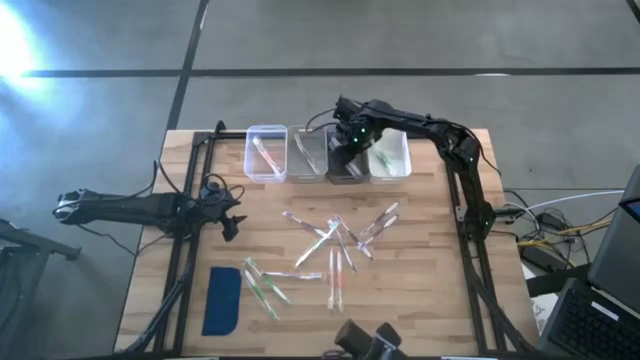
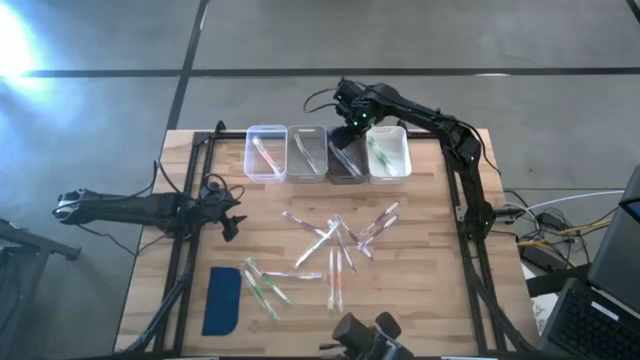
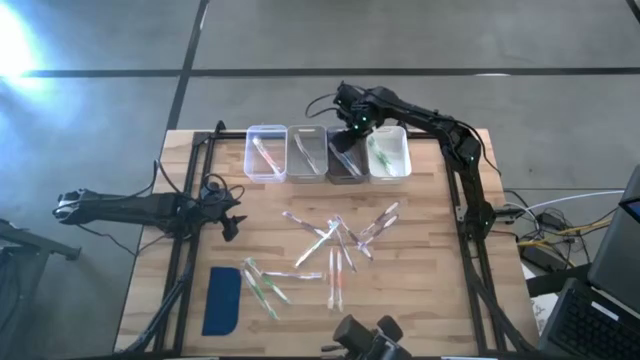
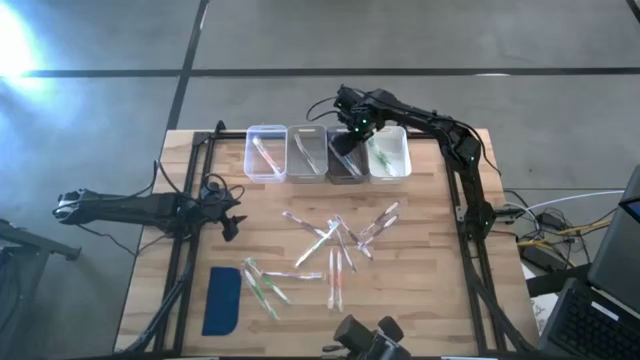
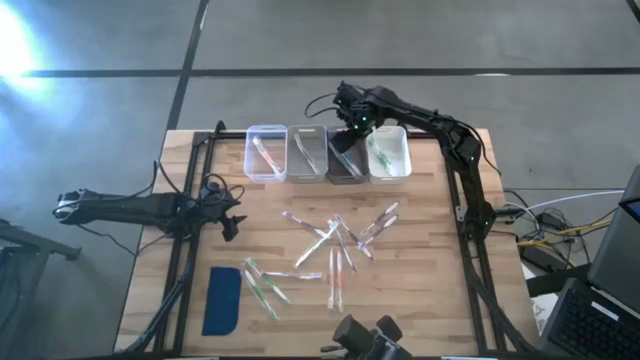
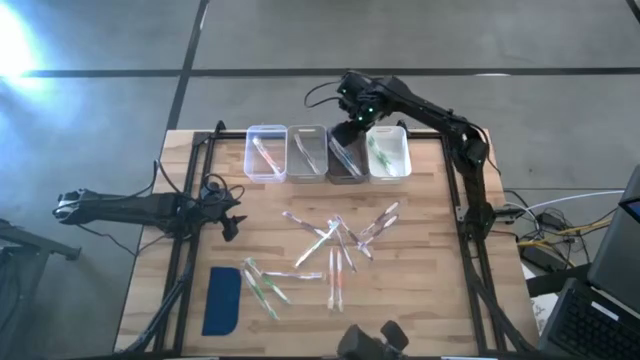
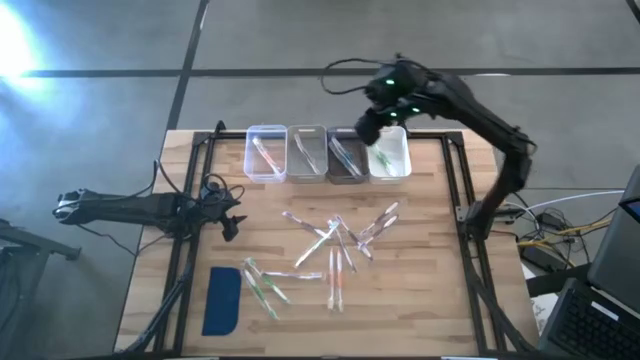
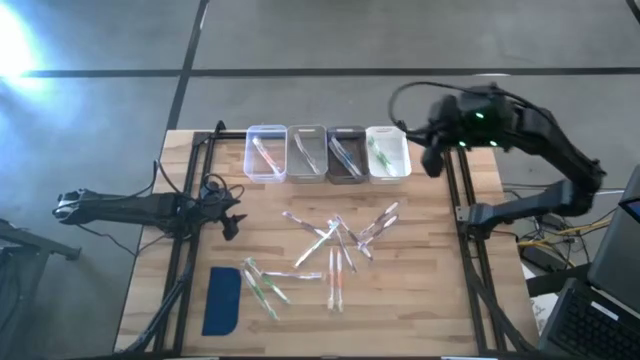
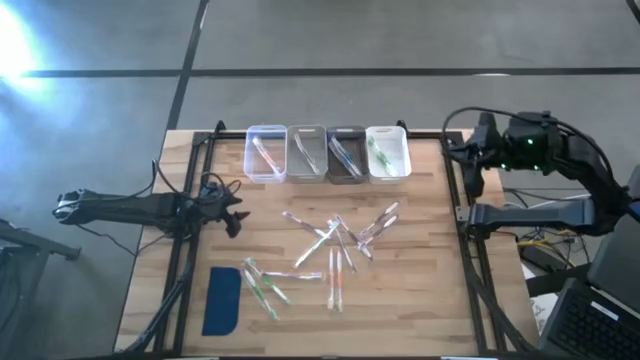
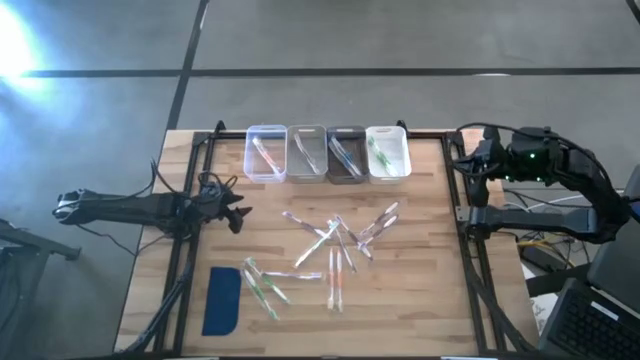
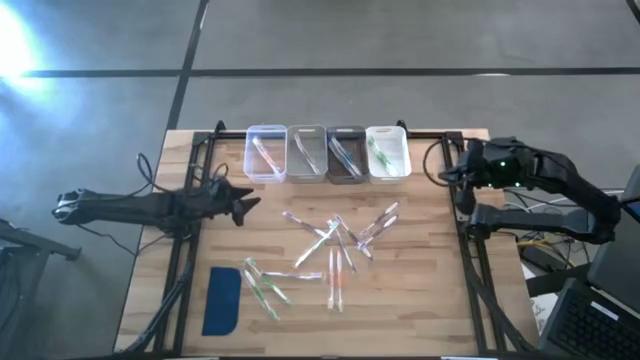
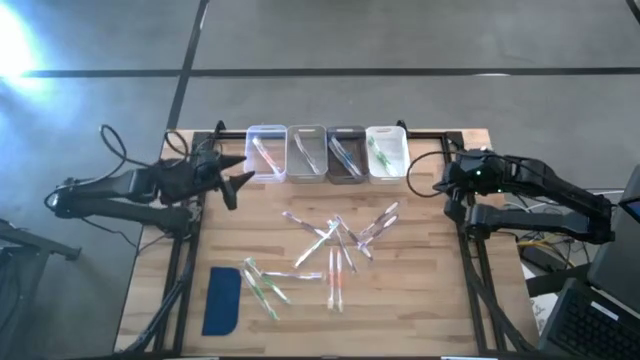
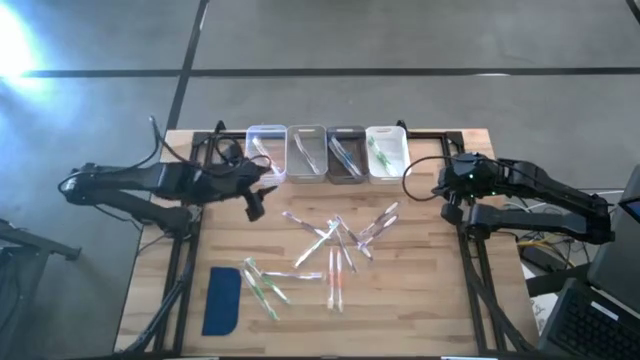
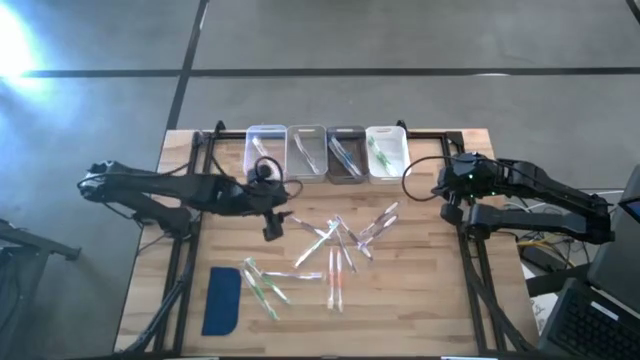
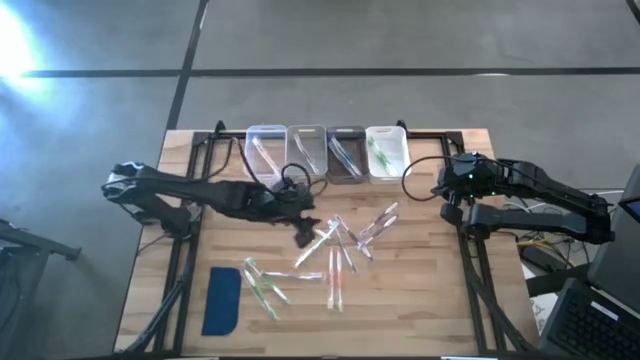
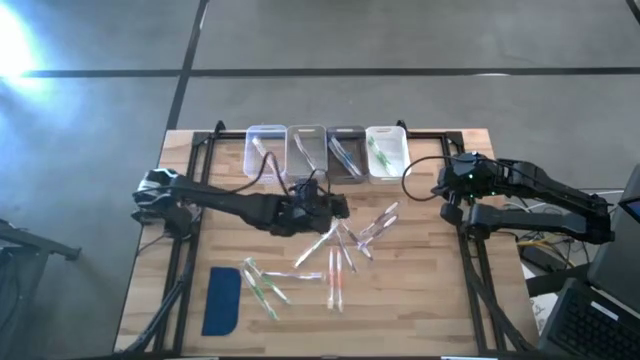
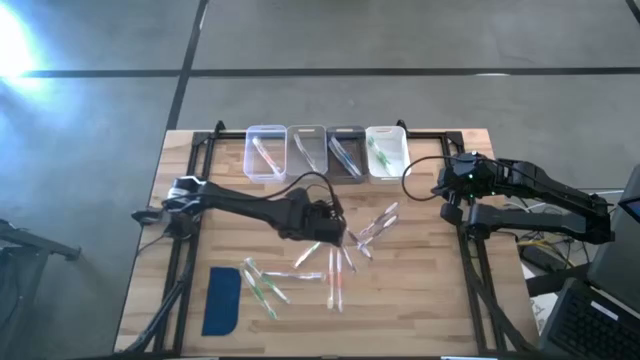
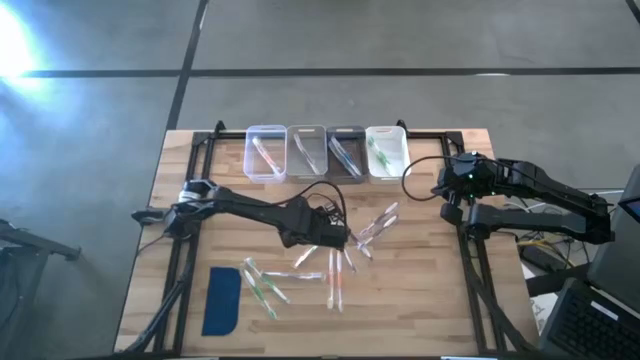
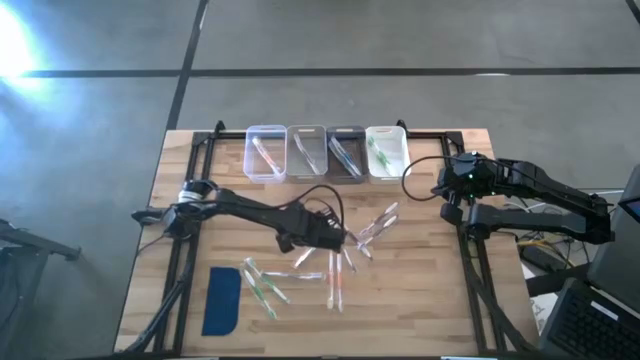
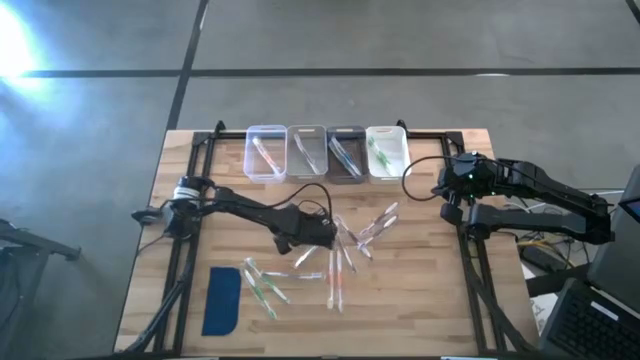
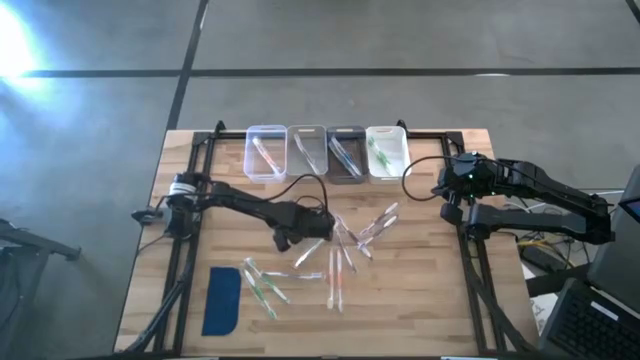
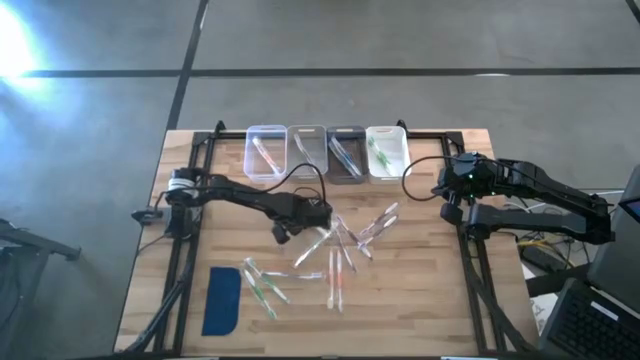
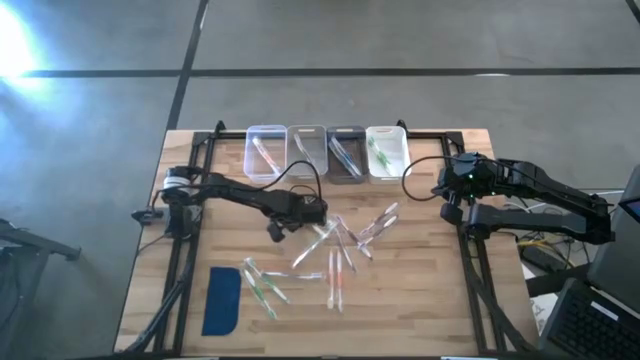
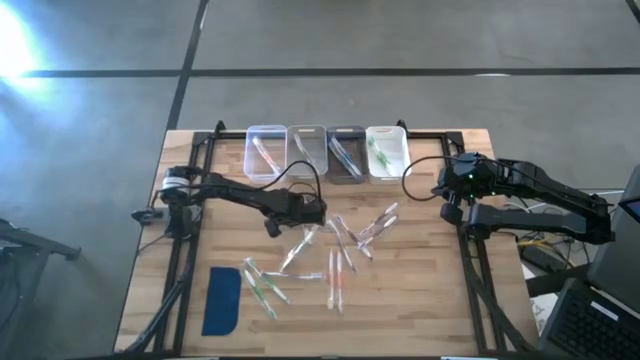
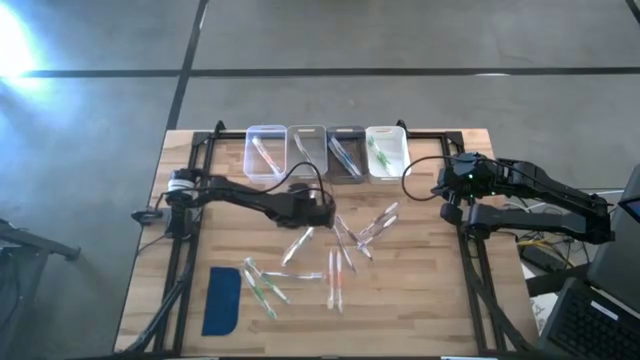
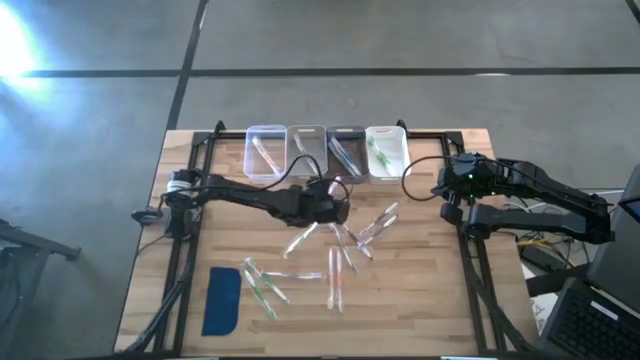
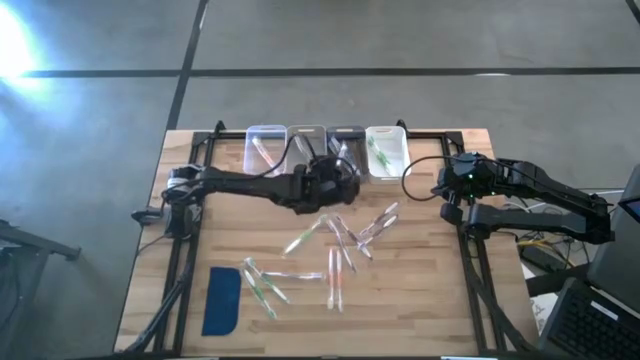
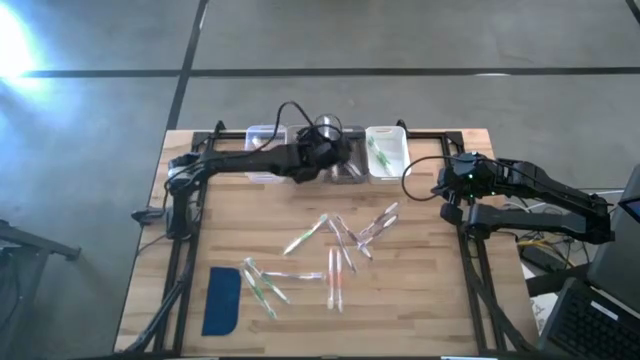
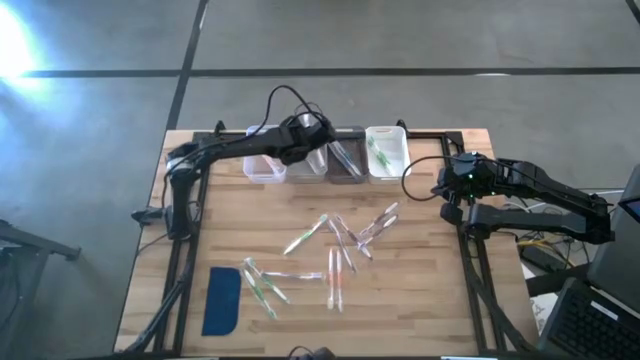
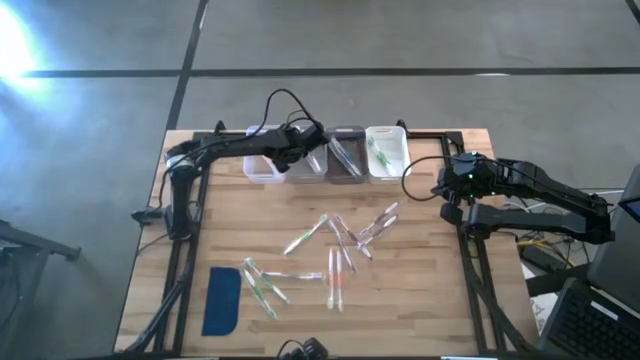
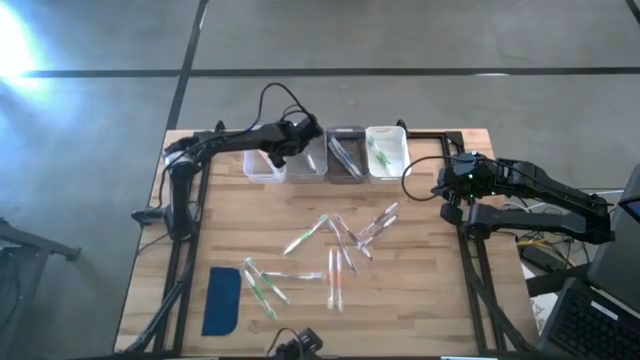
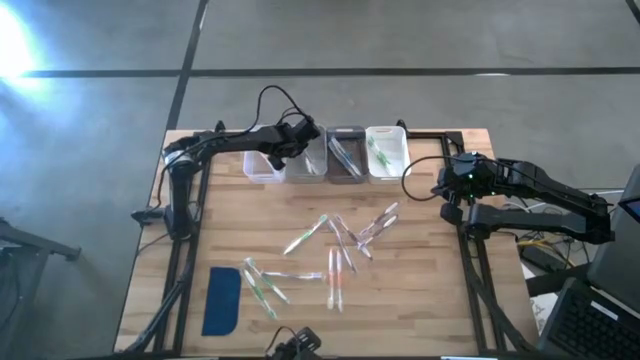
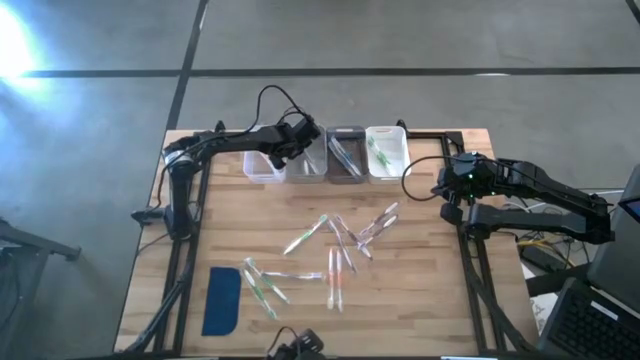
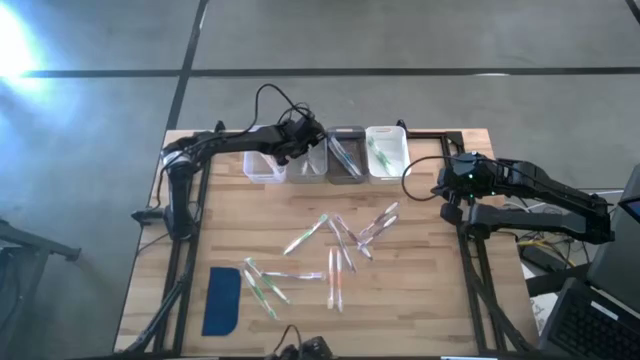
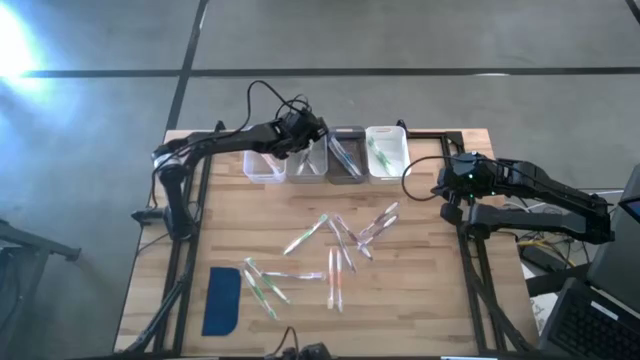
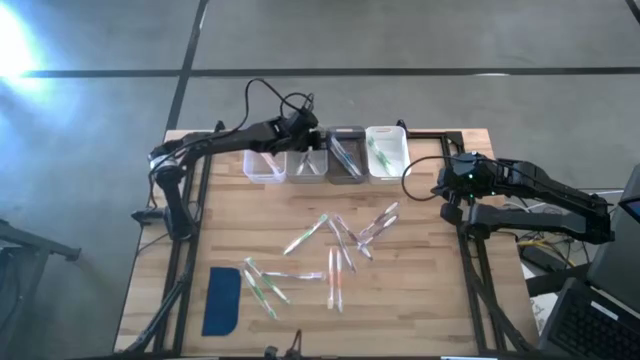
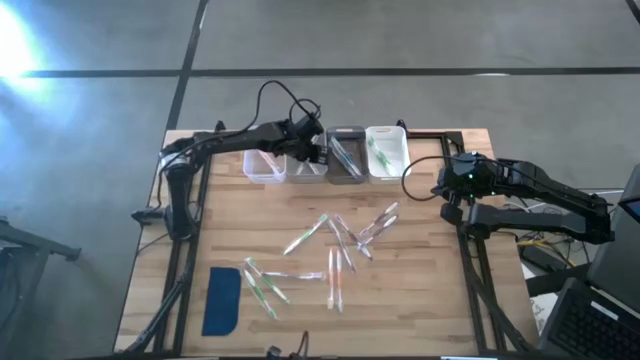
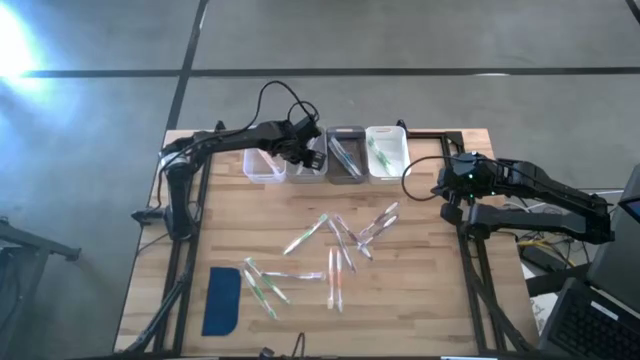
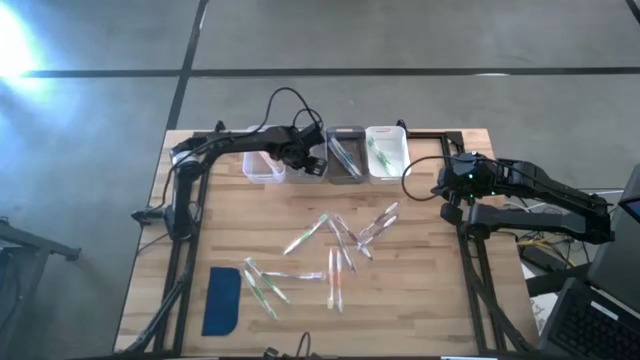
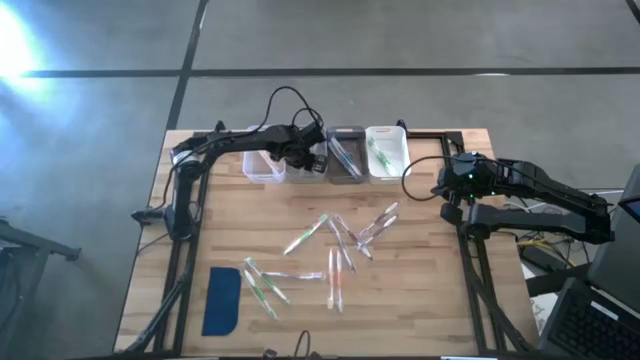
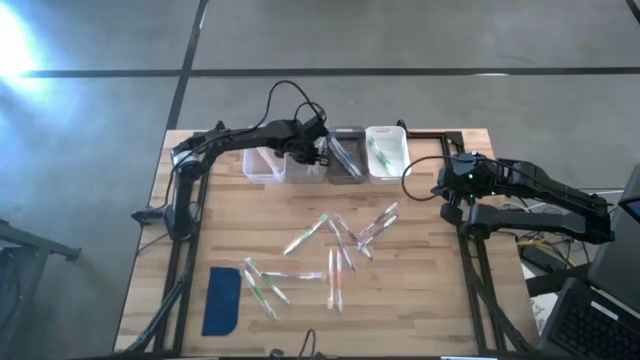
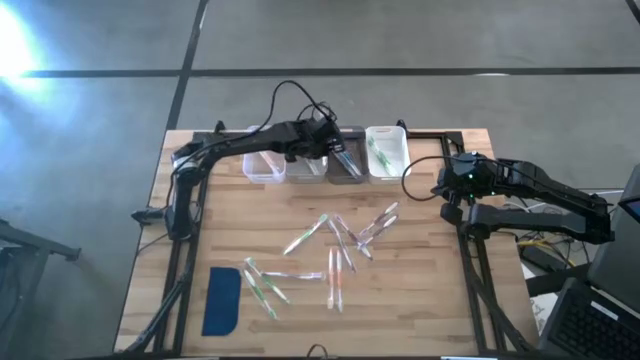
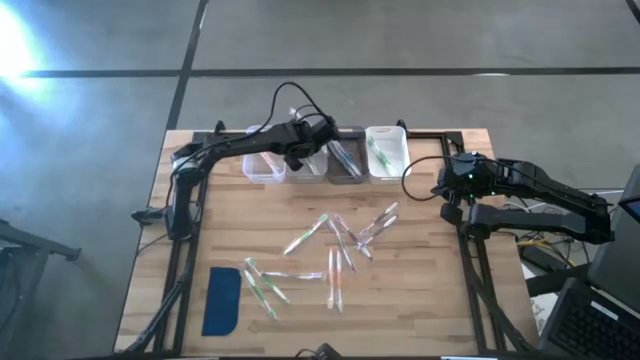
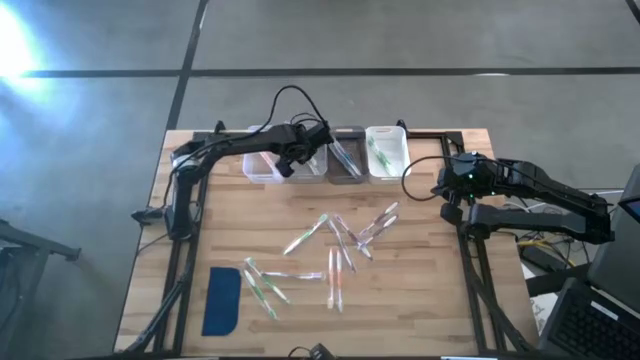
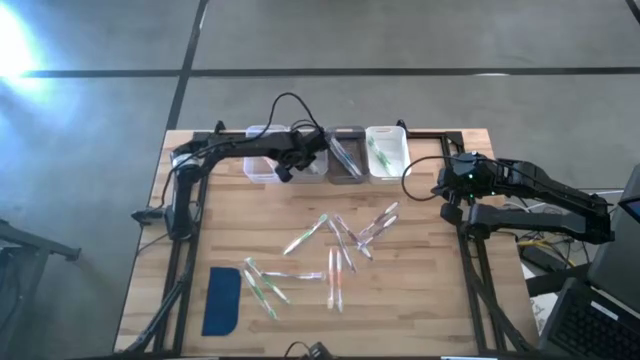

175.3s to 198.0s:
Task: Pick & Place Toothbrushes
Put the purple toothbrush into the gray bin
